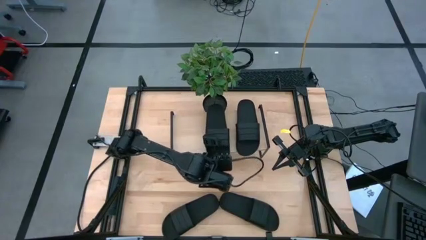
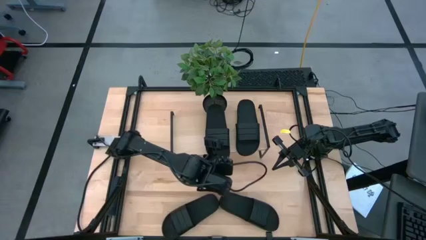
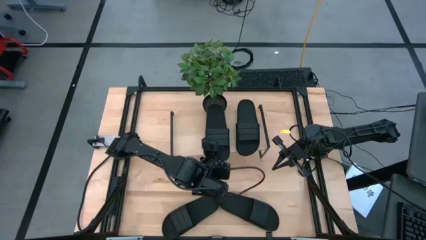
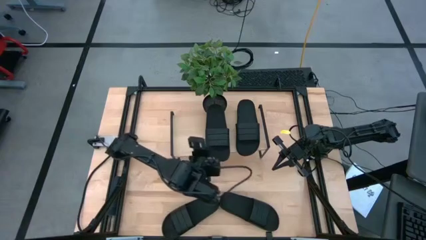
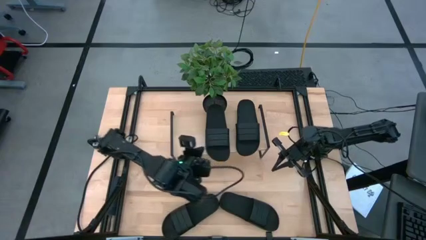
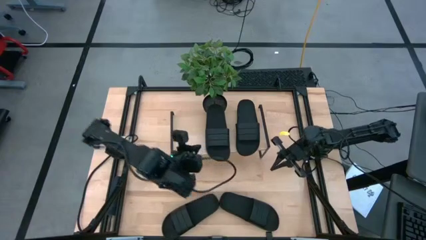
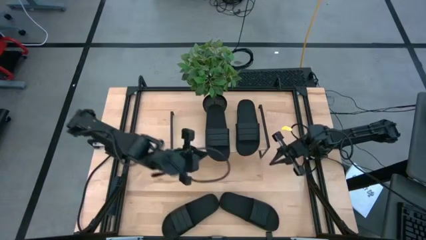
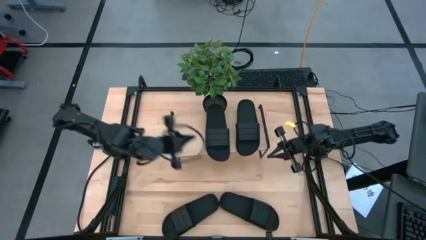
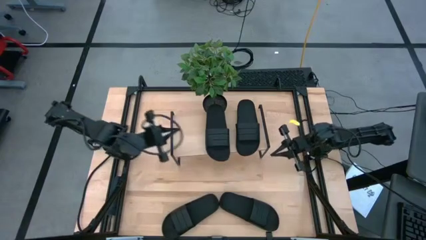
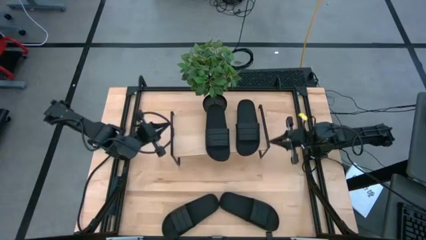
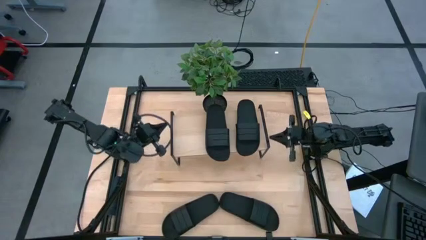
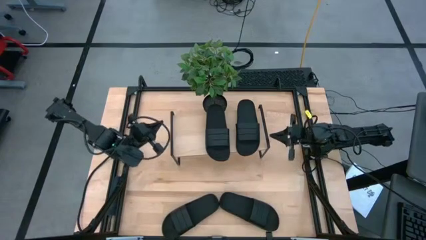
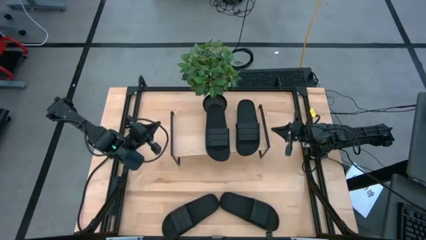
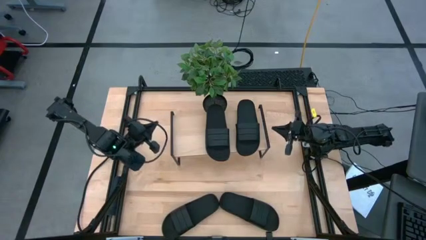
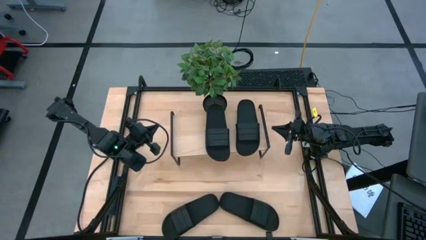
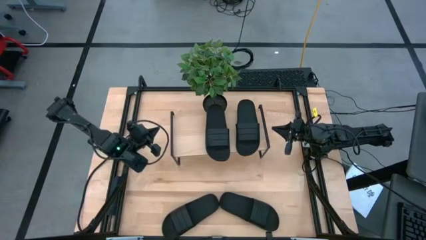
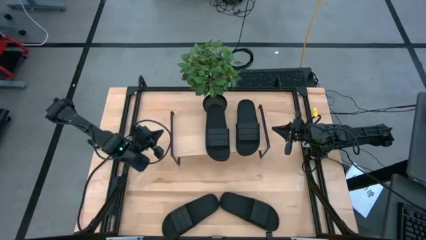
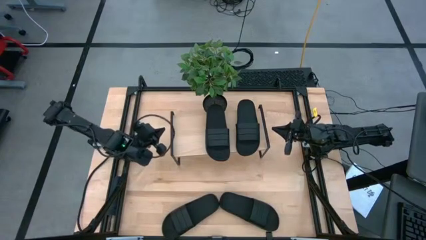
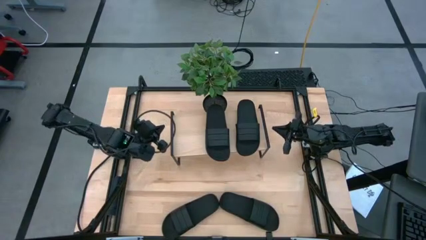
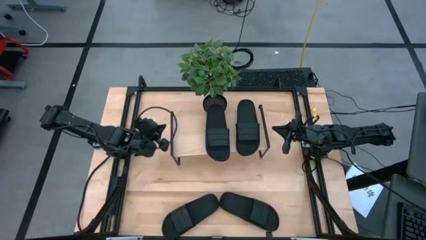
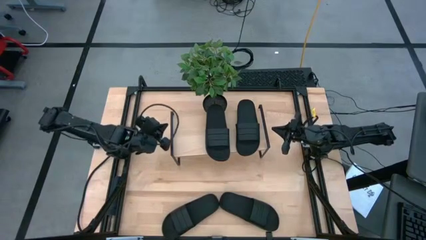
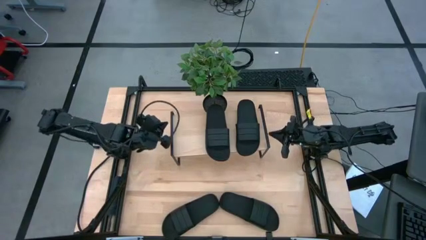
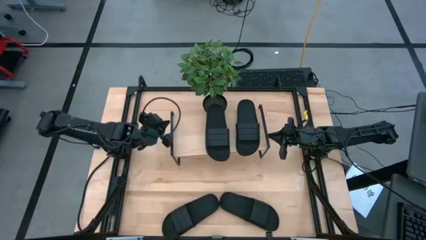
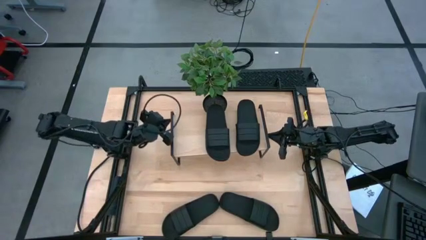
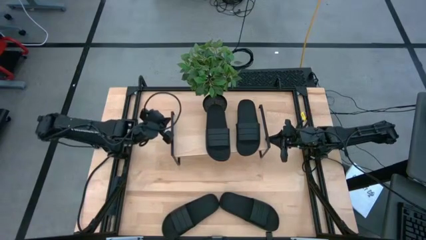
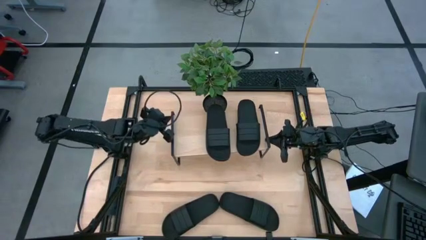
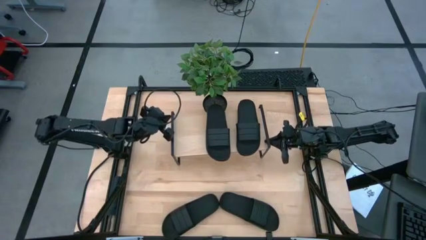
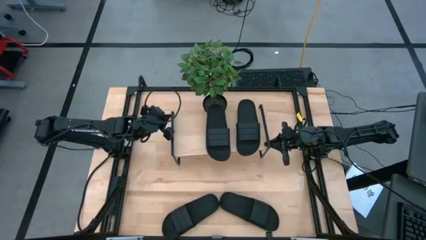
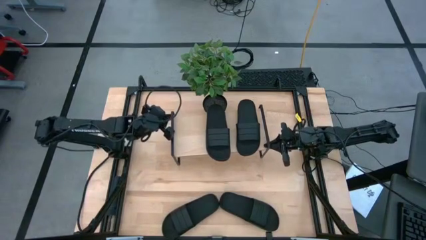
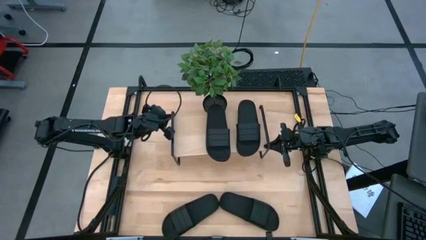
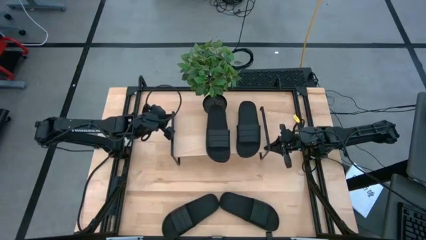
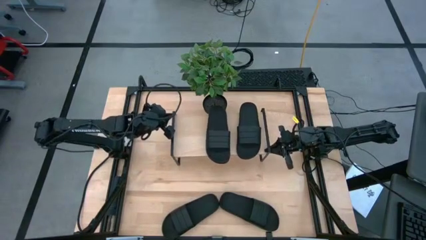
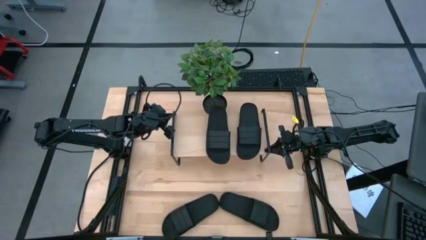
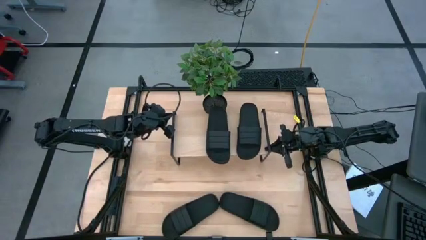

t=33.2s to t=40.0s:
Task: Pick and place slides into the shelf
Adjust the shelf

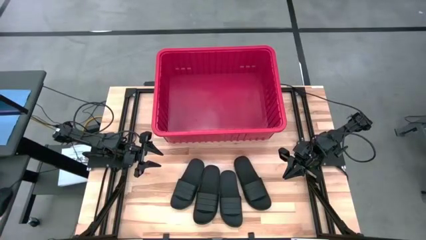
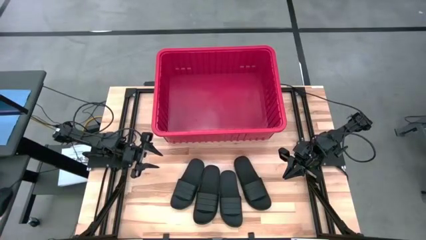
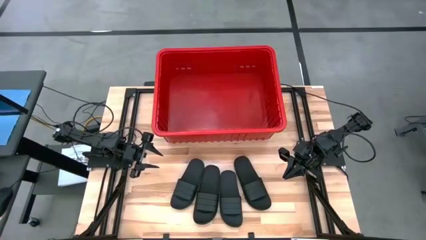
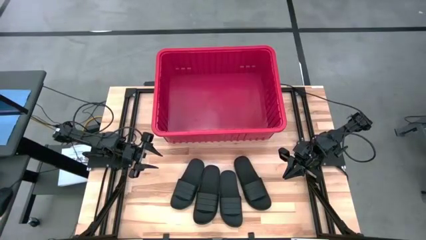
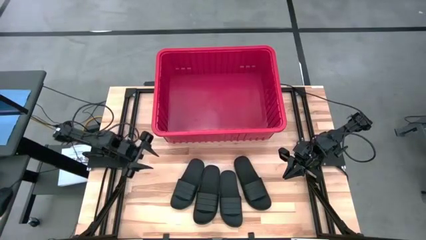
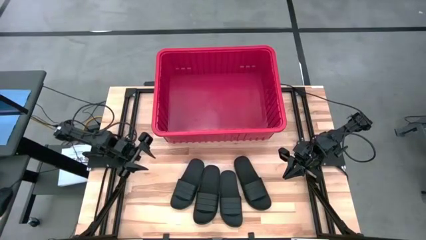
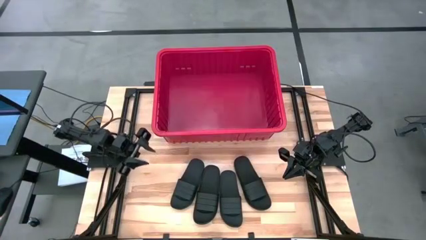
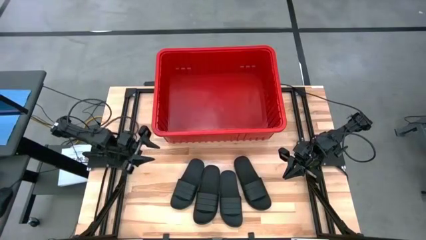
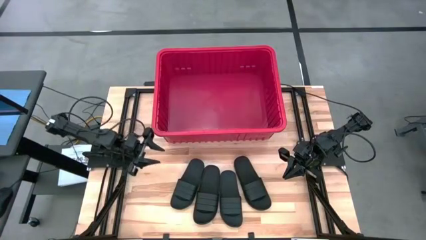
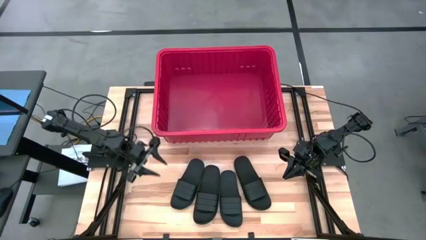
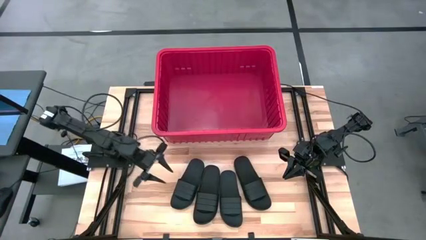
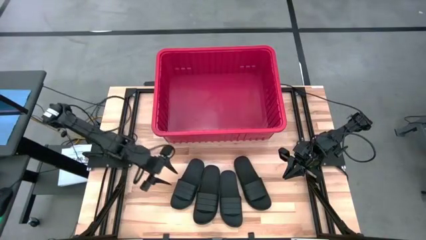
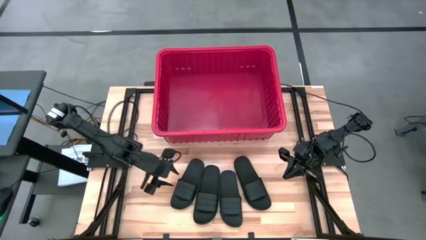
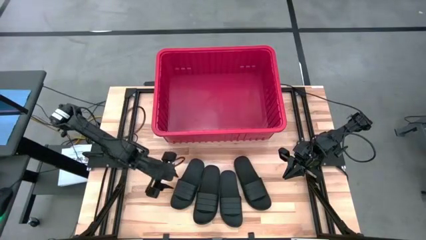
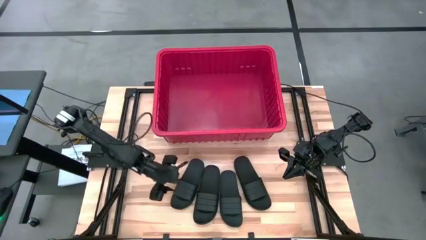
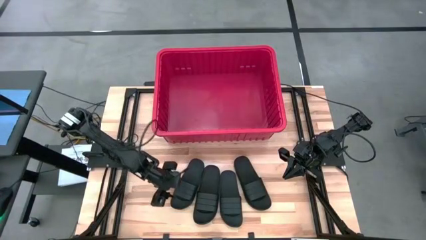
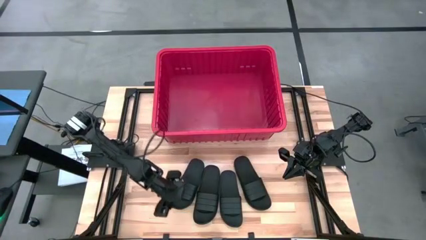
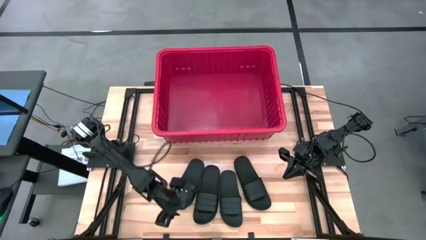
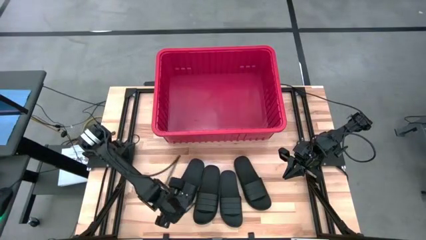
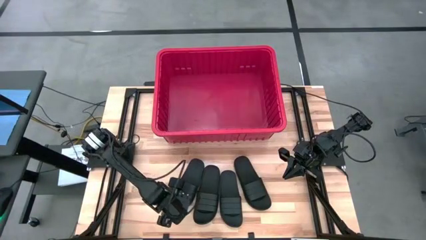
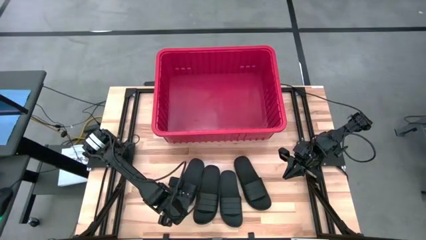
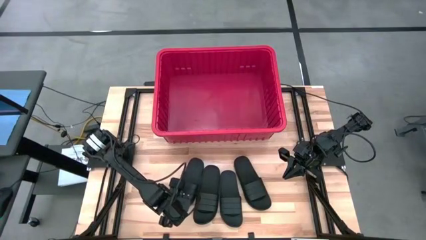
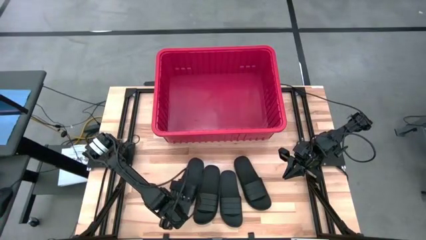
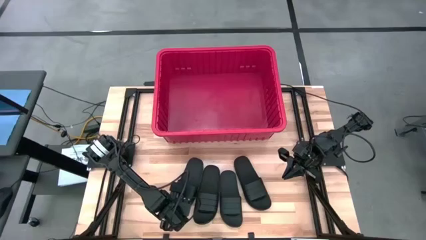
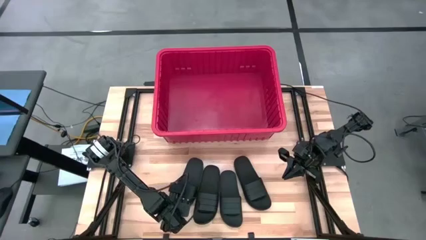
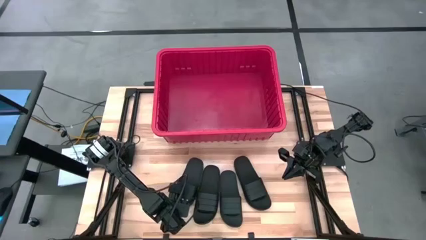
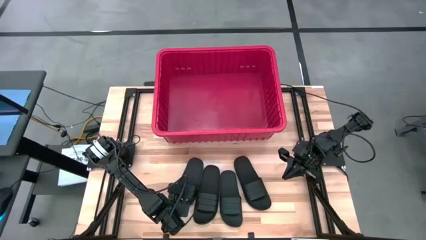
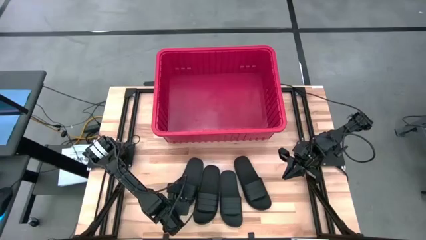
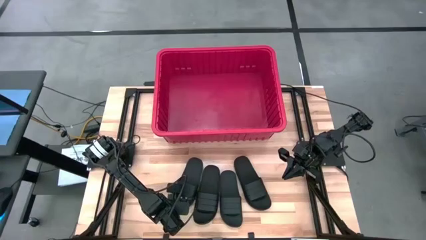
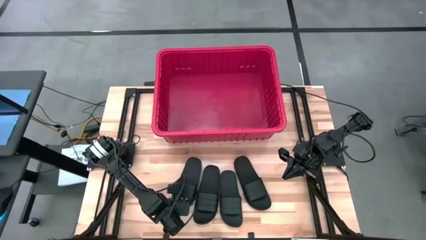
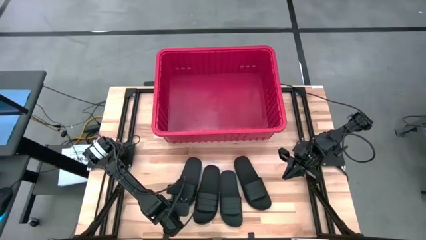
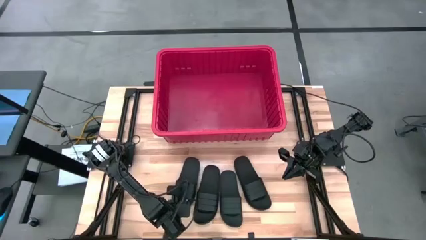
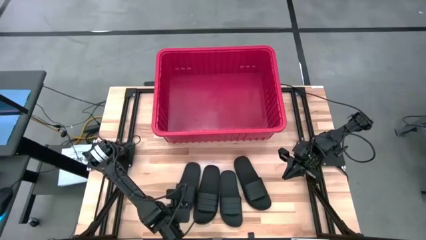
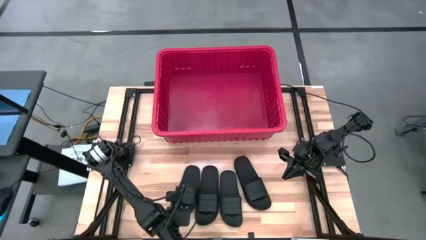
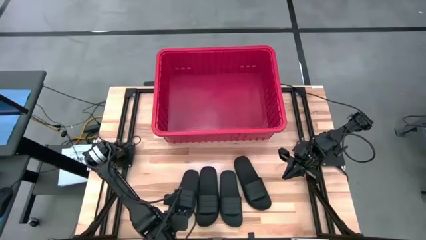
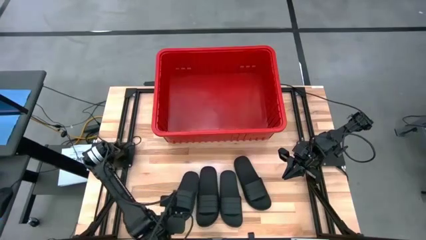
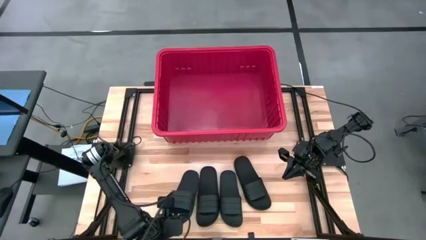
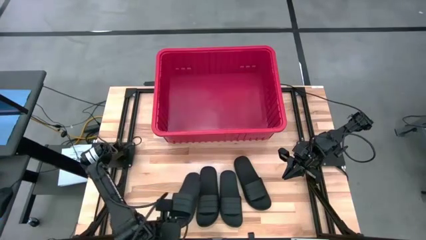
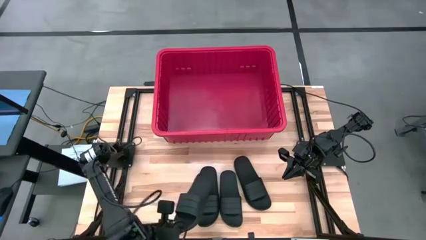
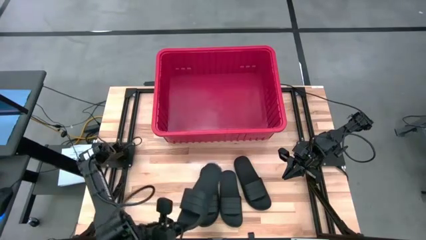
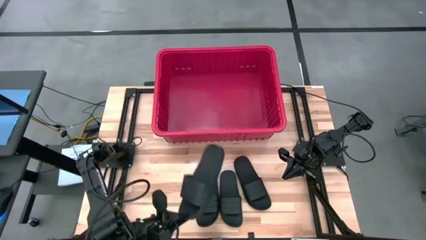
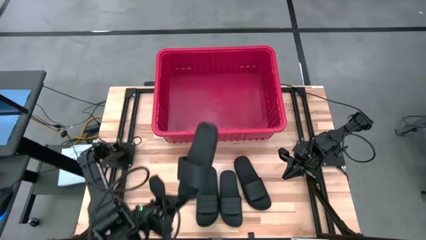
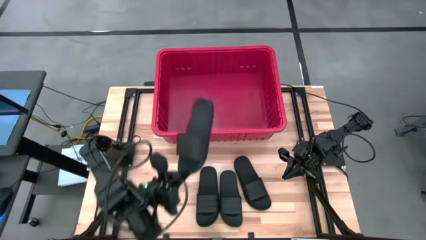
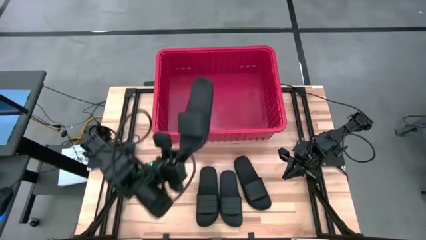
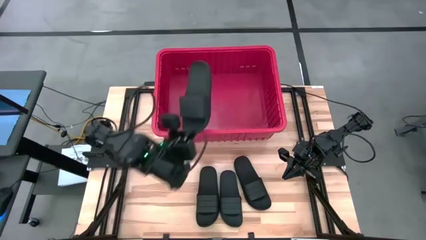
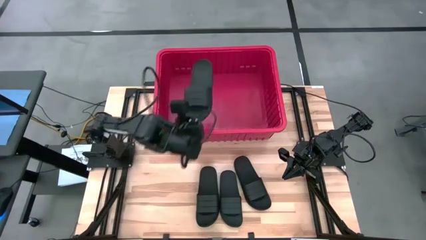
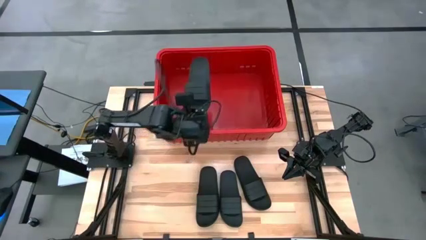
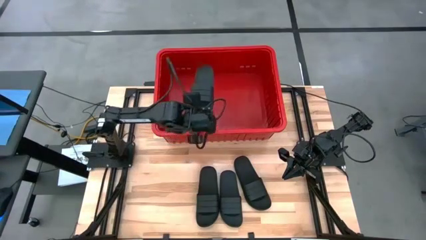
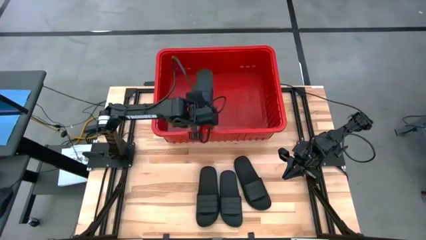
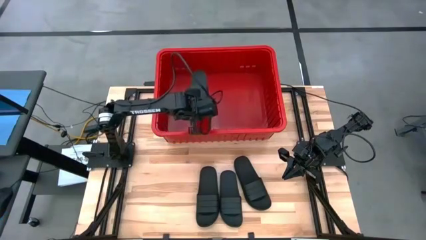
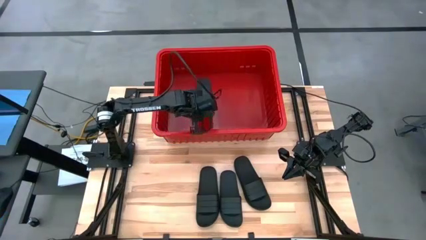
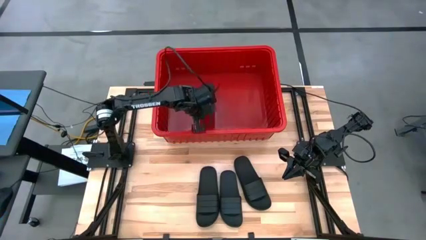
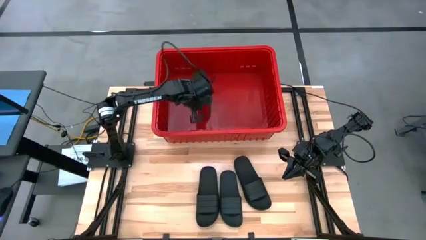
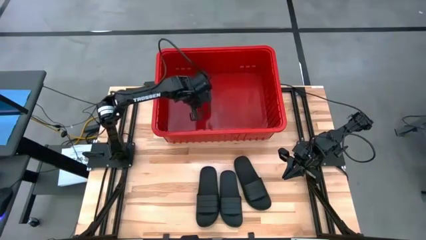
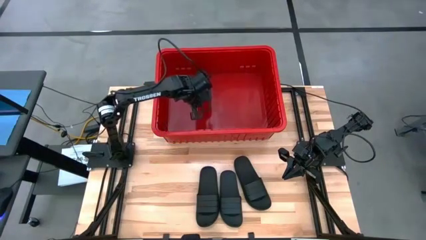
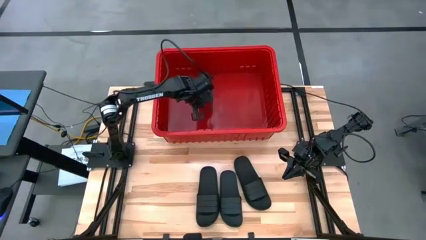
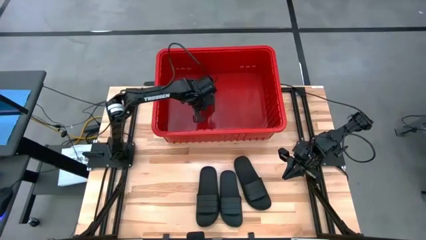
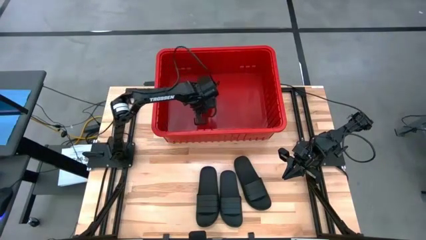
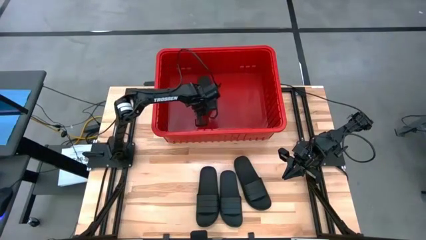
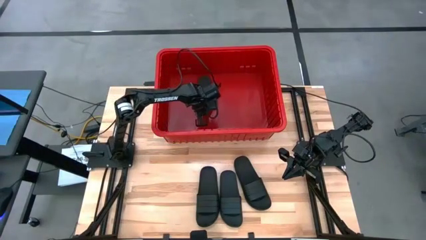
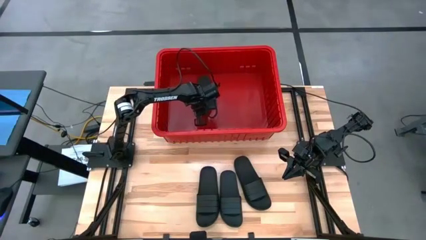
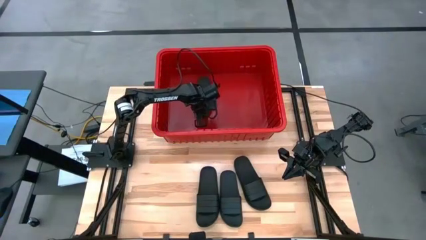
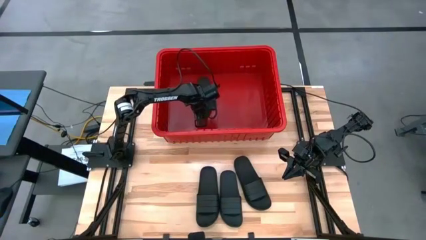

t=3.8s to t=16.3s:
Task: Pick and place slides into bin
Put the black slide into the red container
